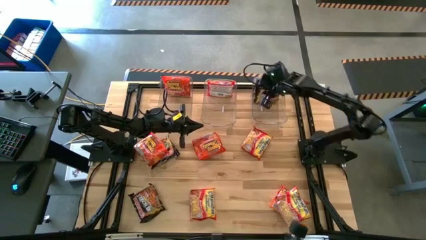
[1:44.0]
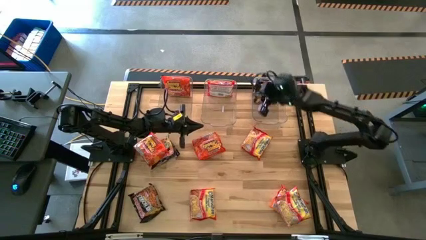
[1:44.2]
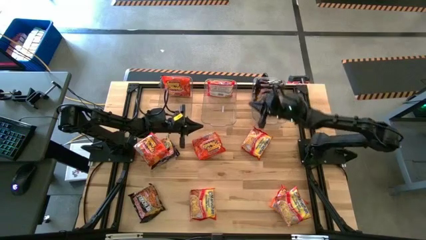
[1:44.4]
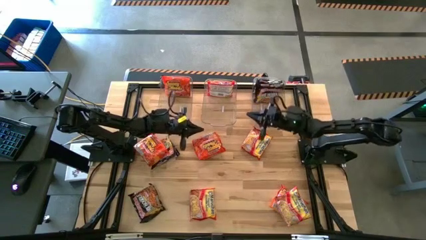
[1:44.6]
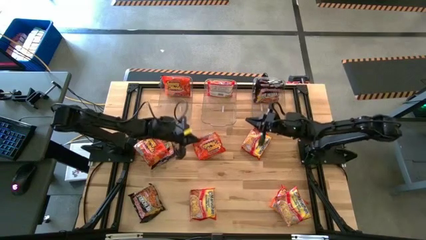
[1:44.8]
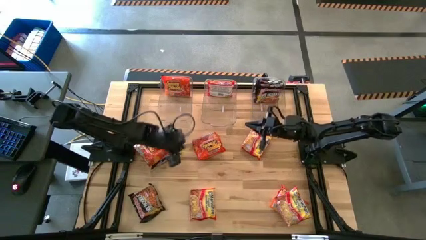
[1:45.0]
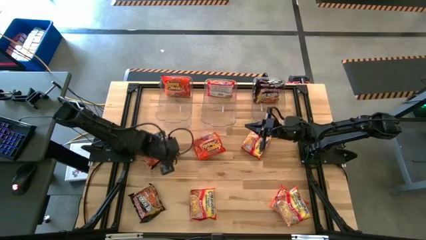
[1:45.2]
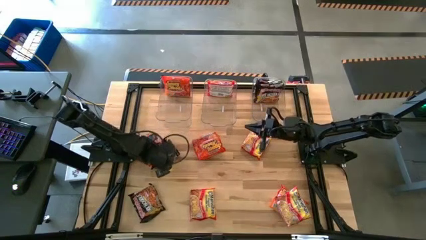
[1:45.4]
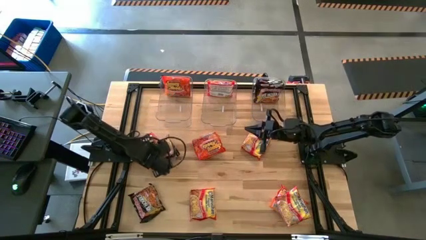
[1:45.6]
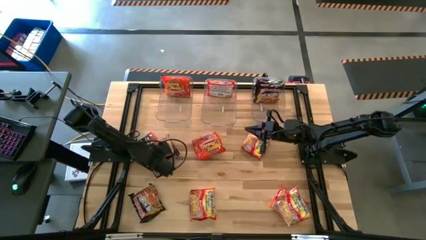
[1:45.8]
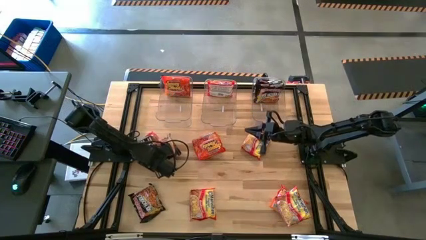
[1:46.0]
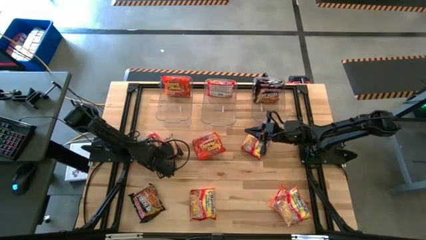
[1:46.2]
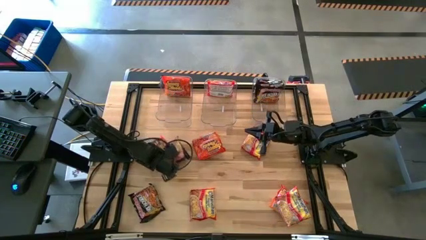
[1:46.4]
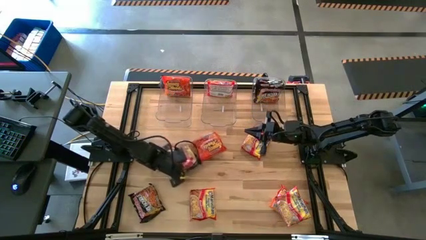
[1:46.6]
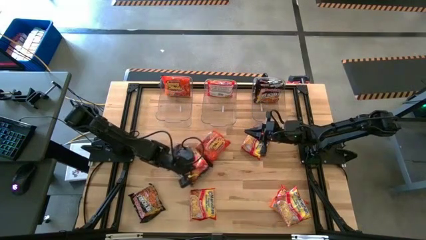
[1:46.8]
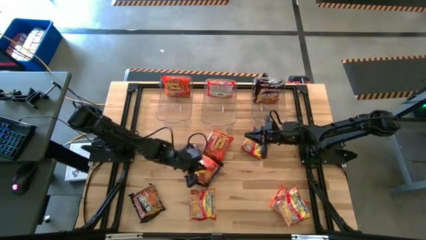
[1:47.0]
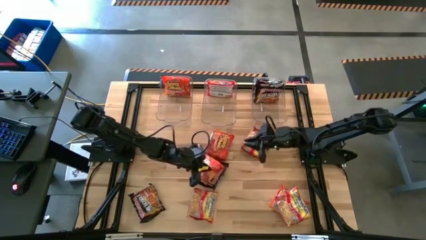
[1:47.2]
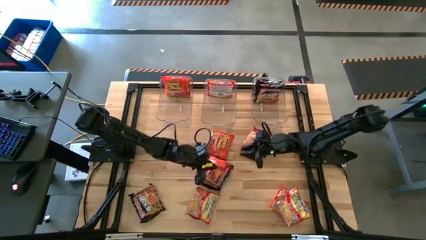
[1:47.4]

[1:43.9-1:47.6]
Task: Sort Maruchan noodles
Put the orange noodle pack into the left transparent bin

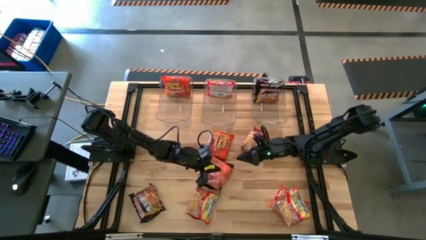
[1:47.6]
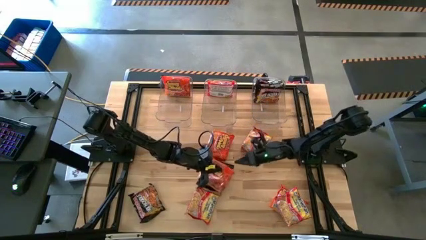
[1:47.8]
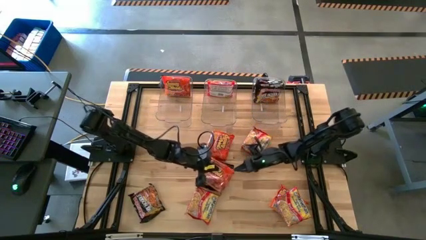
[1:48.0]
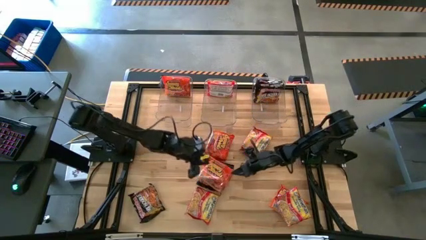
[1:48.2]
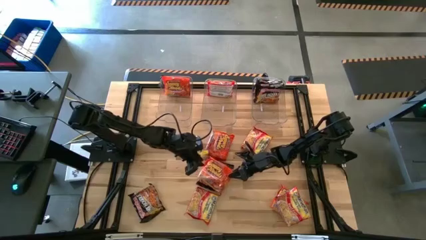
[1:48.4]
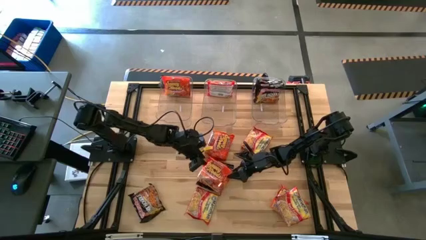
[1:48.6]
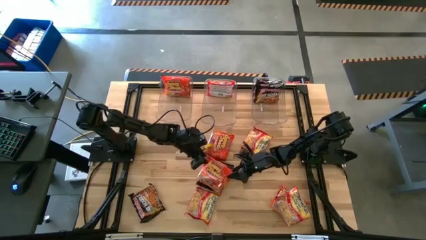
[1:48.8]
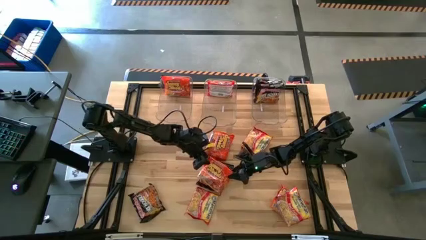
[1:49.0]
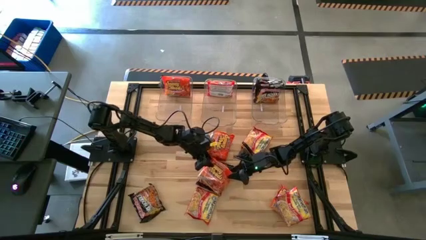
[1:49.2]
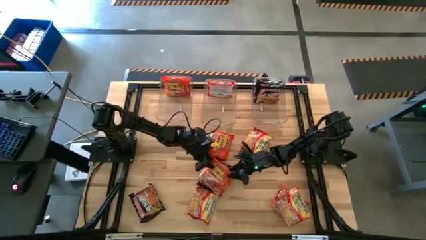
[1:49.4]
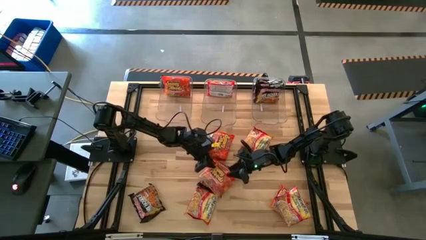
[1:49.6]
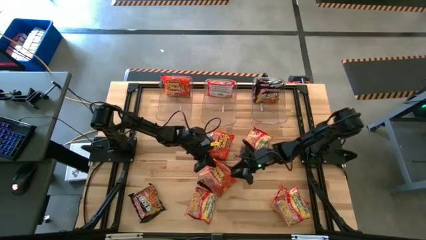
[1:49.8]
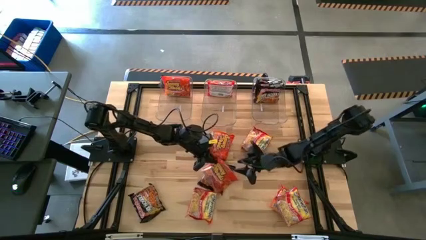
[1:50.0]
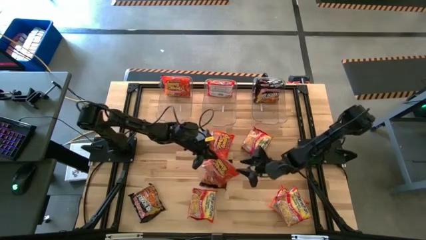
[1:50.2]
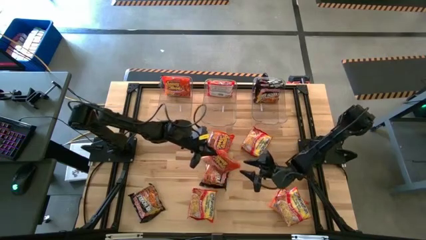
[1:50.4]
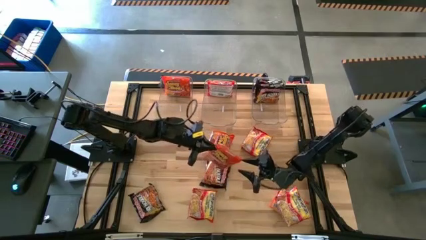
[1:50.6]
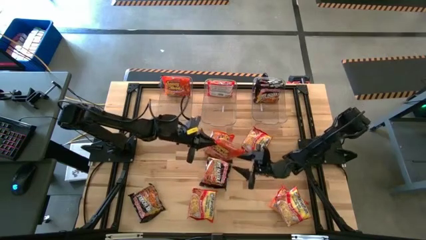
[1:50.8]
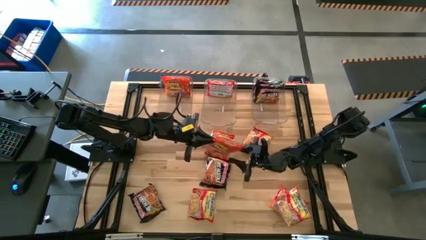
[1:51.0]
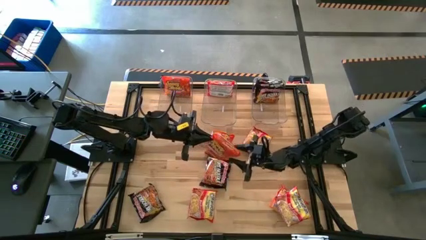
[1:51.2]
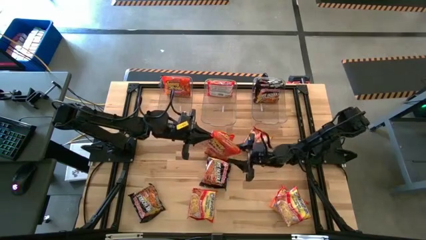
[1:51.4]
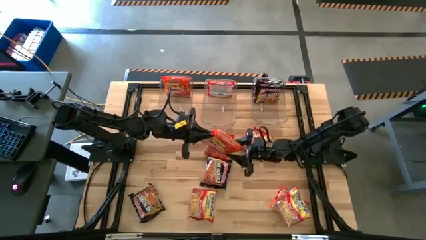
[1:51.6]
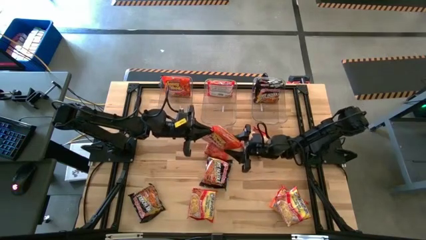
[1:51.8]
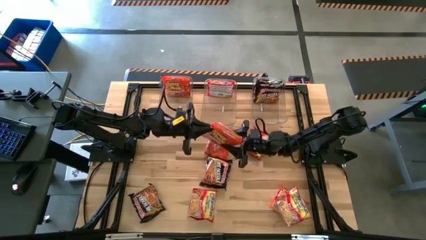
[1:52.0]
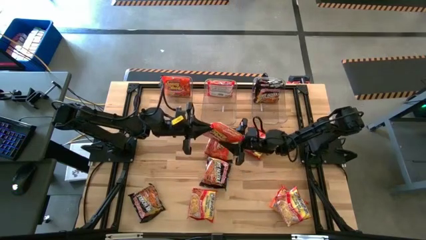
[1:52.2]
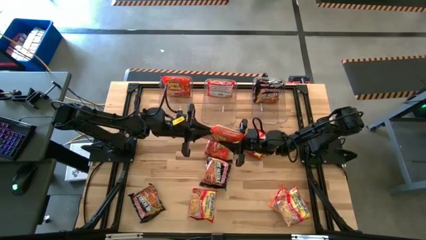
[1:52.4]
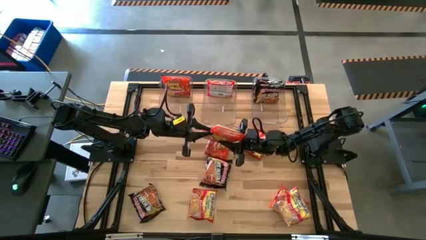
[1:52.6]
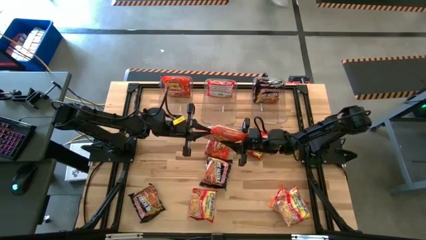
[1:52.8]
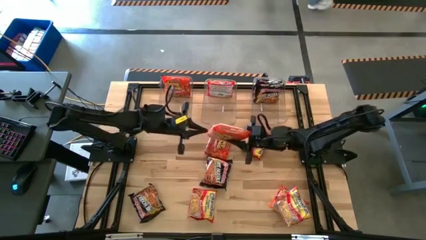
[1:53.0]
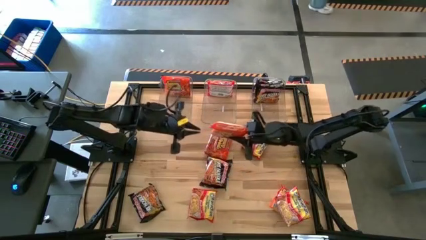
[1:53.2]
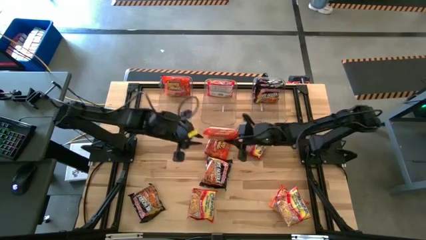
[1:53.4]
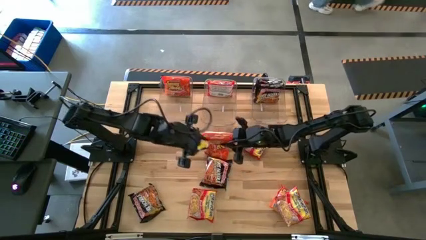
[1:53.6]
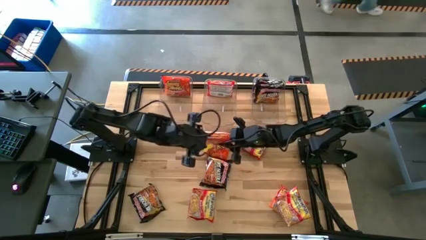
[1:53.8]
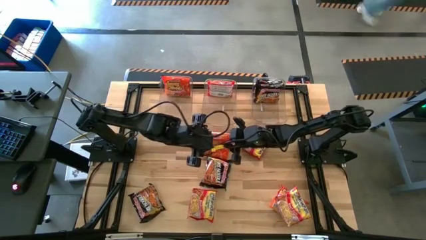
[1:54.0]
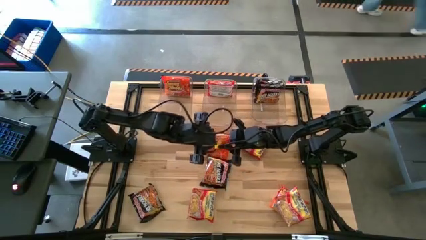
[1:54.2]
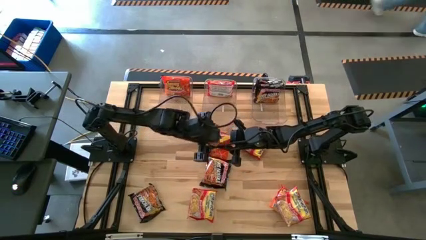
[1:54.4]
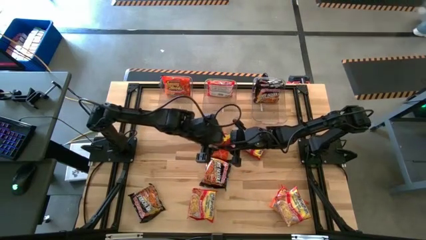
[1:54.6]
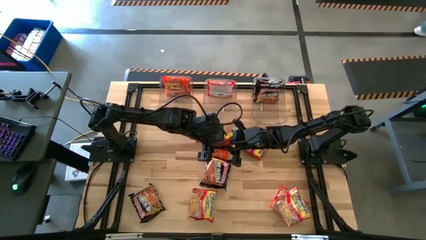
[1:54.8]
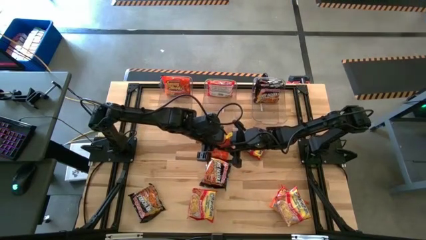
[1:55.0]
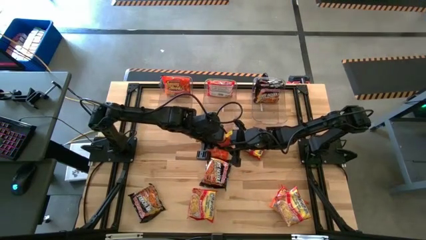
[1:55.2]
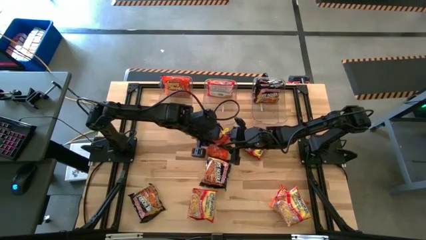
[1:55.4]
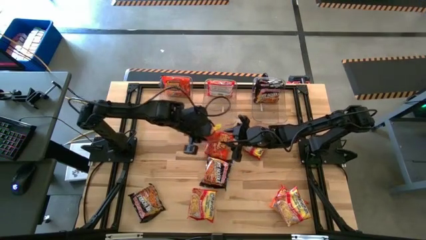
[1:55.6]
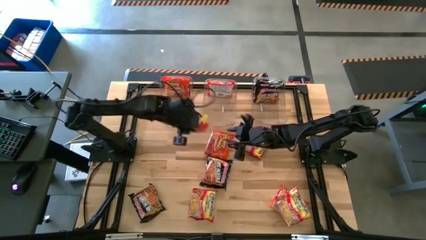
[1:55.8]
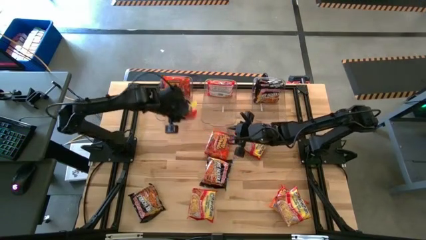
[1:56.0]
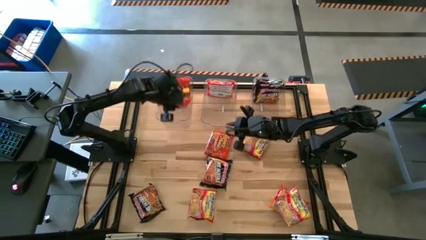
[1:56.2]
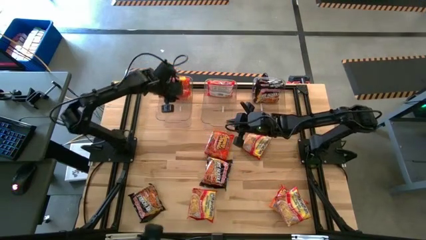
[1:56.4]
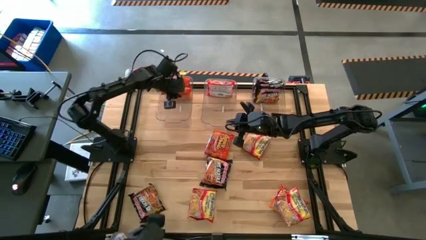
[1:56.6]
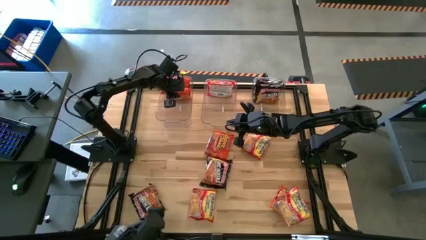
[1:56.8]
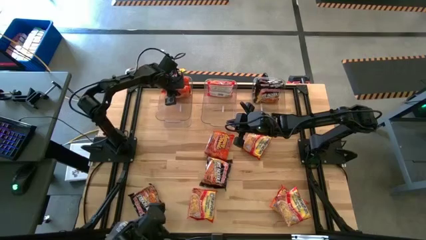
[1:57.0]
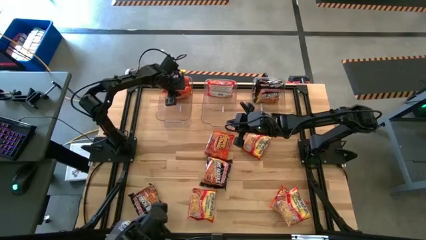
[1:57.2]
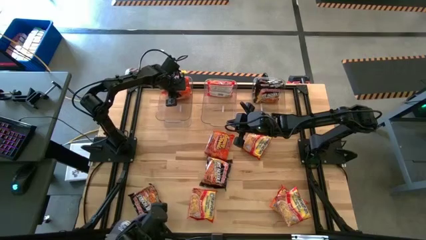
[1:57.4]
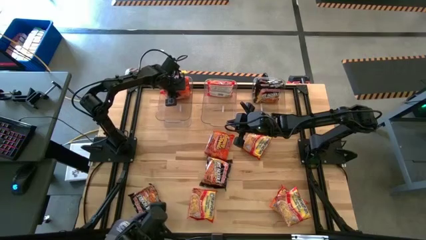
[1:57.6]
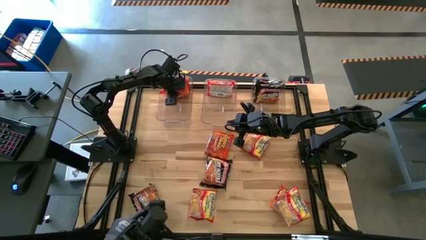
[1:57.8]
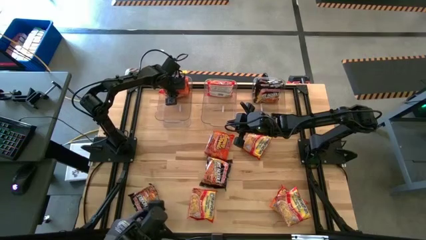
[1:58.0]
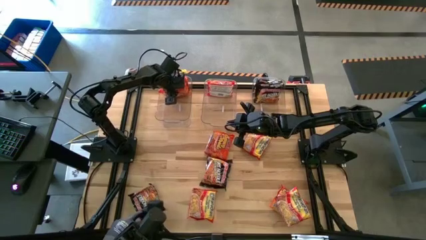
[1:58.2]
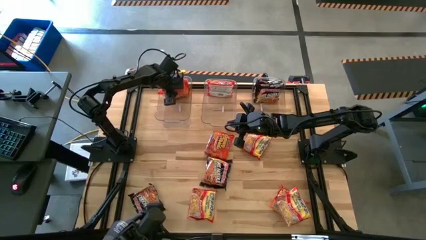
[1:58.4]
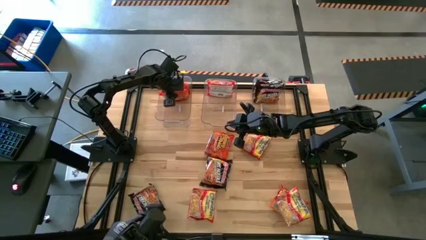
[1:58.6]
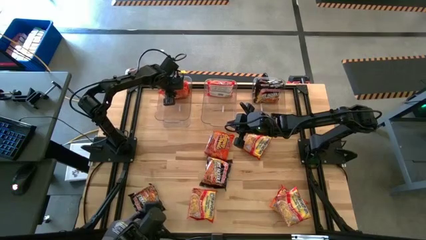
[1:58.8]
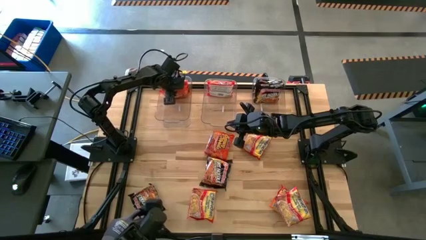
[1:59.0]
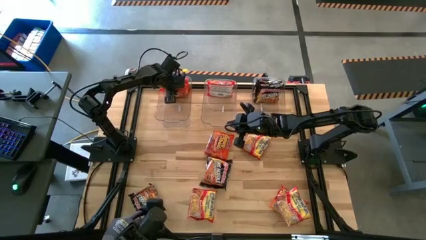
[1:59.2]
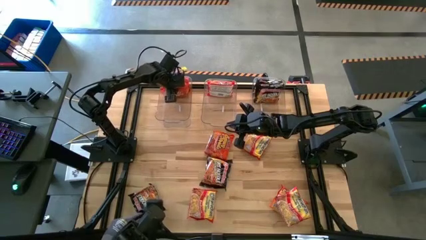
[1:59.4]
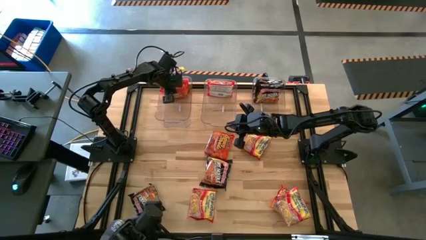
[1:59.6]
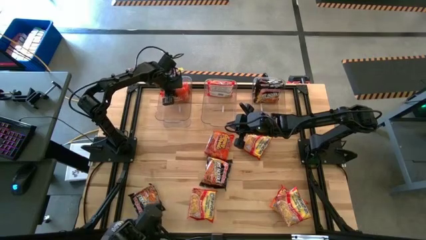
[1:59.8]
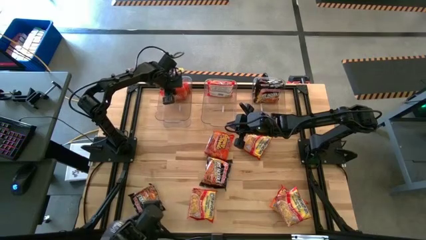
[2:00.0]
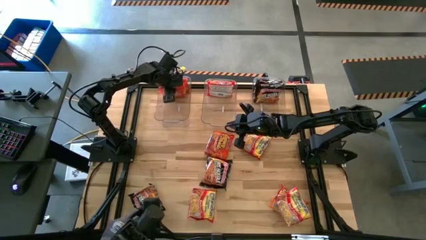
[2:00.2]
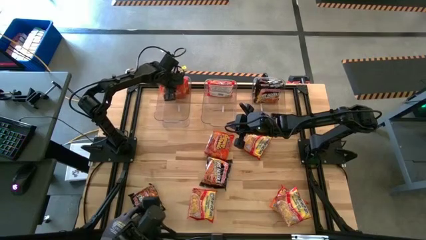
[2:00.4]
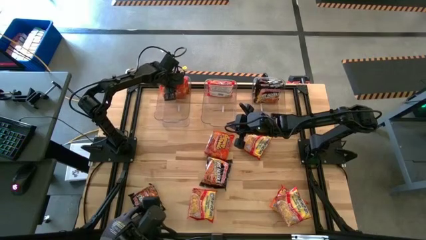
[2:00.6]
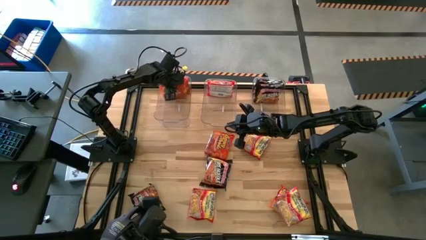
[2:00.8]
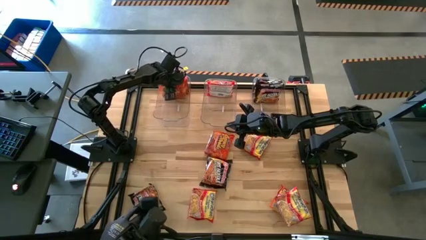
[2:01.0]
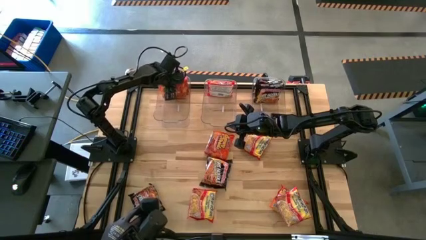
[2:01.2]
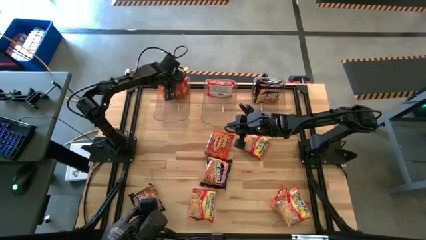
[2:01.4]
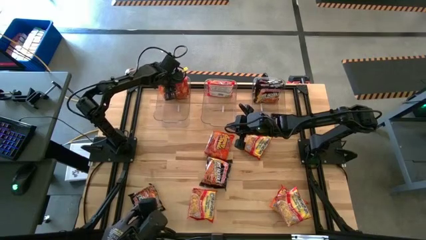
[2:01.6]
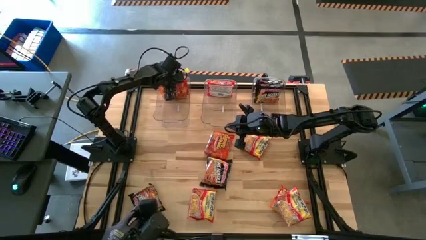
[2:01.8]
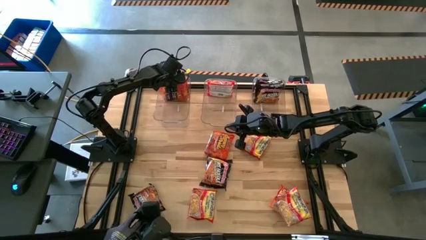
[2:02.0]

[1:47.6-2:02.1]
Put the orange noodle pack into the left transparent bin
